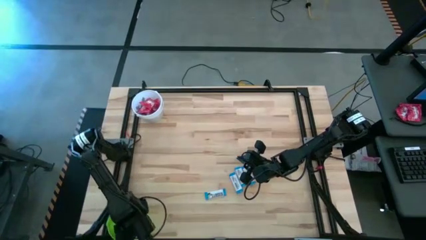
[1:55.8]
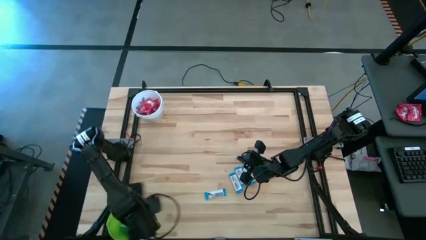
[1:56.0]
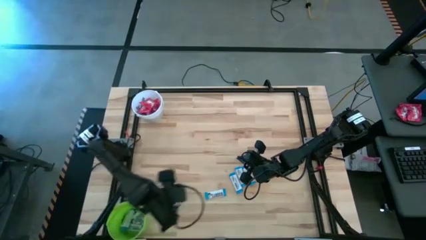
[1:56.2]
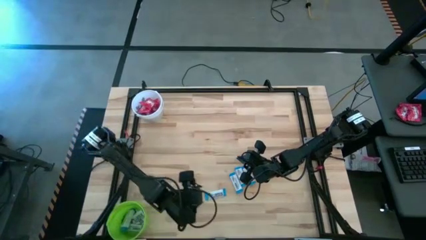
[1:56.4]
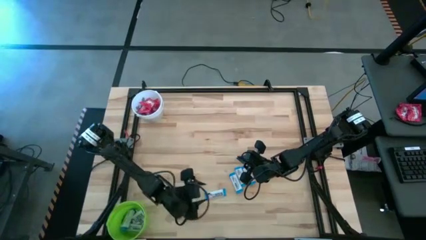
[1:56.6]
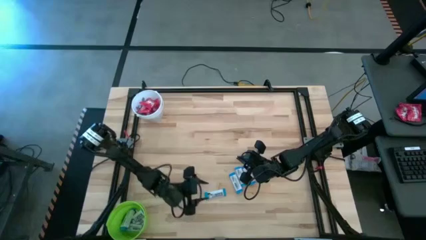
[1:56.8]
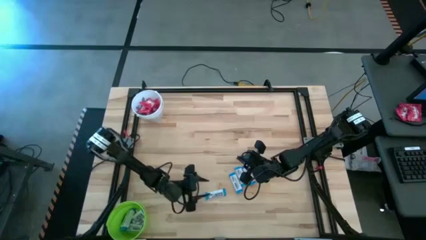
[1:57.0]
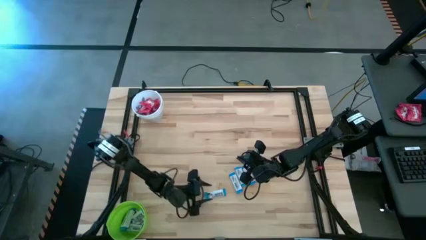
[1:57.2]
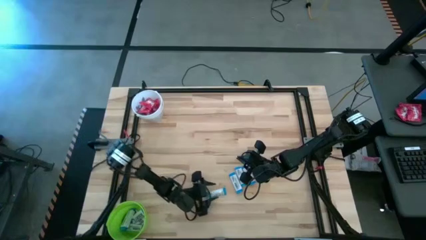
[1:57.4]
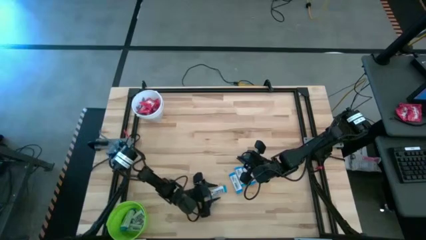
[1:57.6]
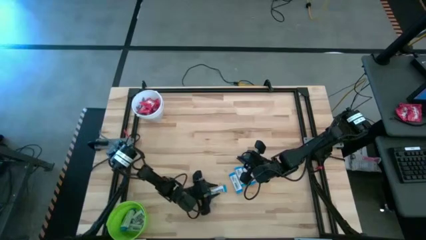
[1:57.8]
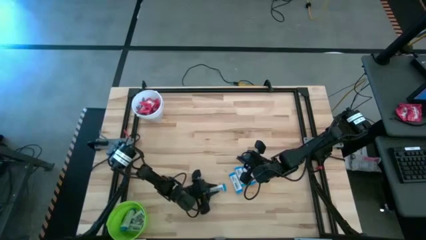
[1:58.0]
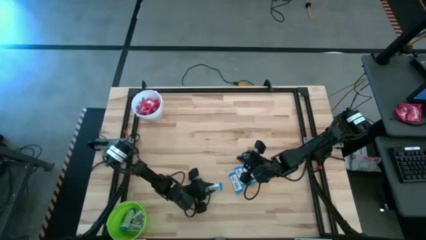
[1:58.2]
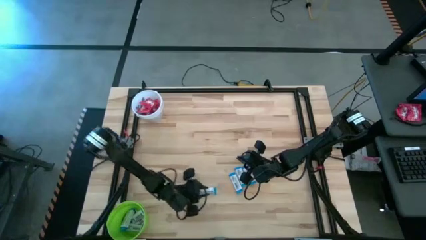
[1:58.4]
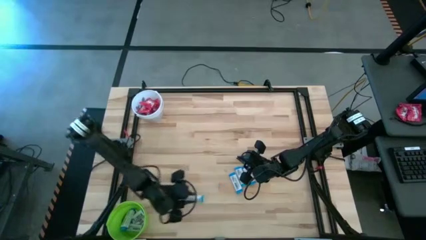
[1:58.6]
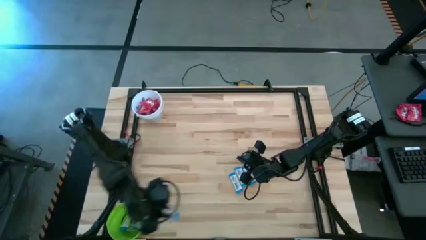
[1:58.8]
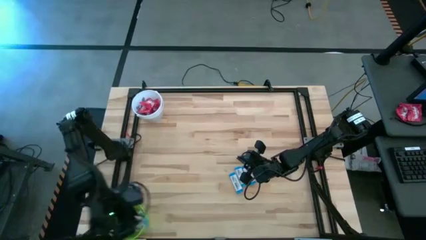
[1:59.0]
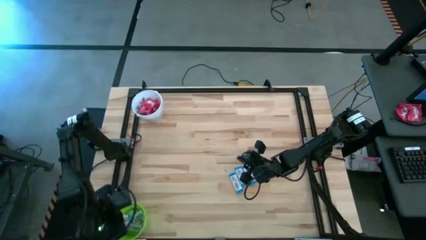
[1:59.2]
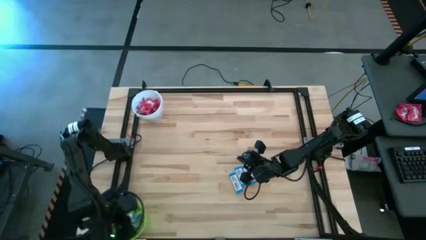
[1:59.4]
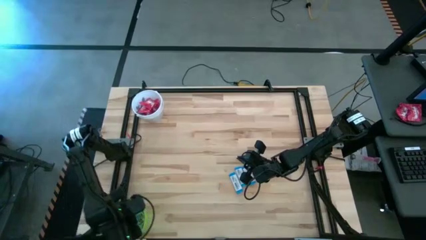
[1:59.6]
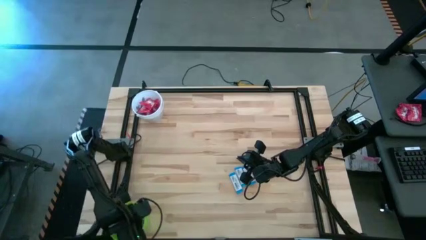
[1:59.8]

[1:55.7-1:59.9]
Task: Sort candy by brand, put in halloween buckets
Put the blue chocolate bar into the green bucket

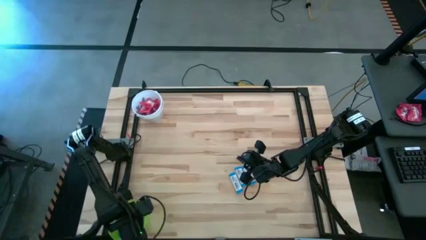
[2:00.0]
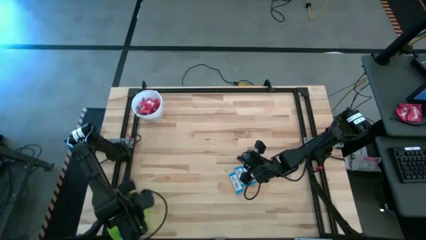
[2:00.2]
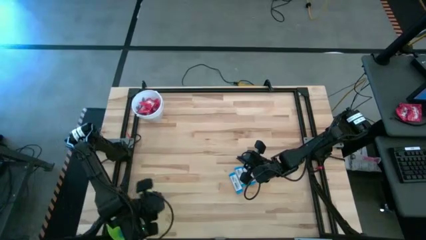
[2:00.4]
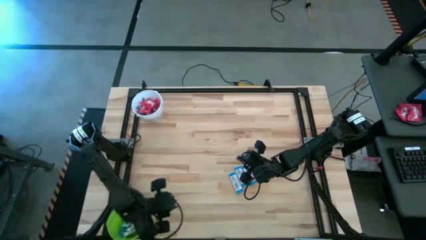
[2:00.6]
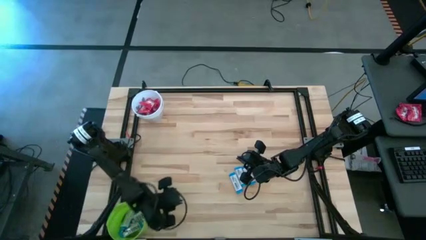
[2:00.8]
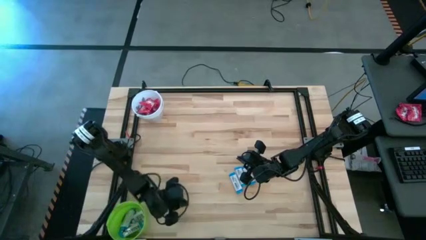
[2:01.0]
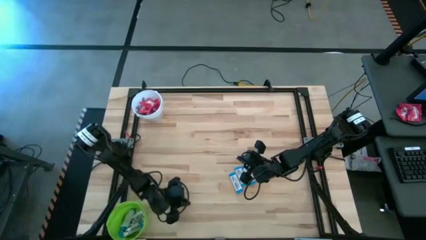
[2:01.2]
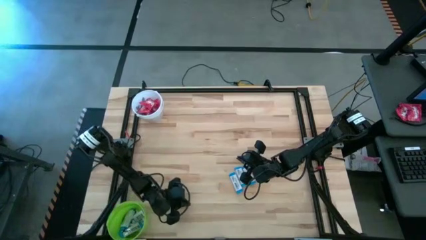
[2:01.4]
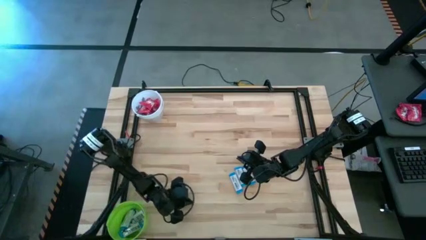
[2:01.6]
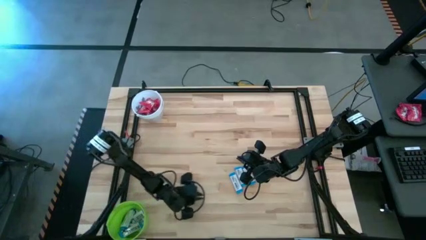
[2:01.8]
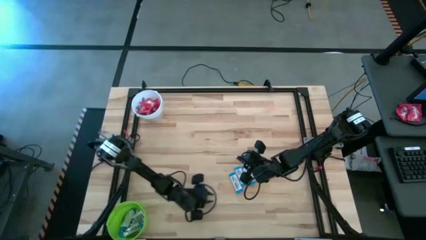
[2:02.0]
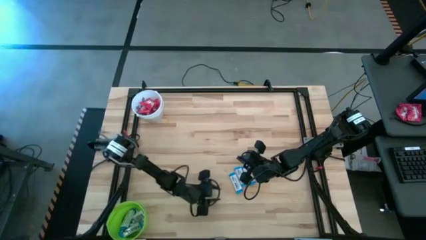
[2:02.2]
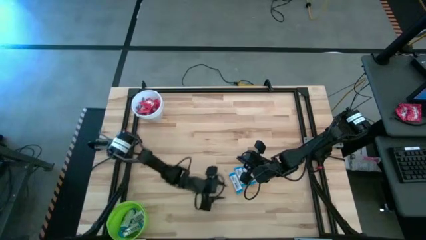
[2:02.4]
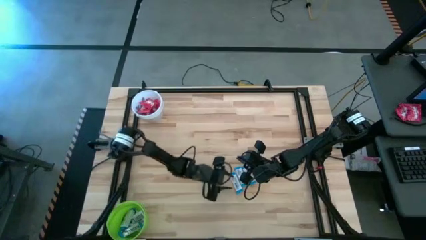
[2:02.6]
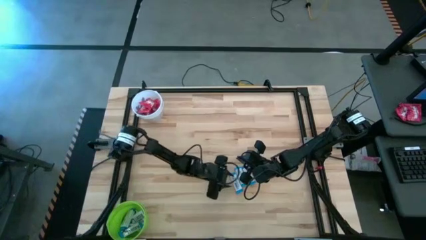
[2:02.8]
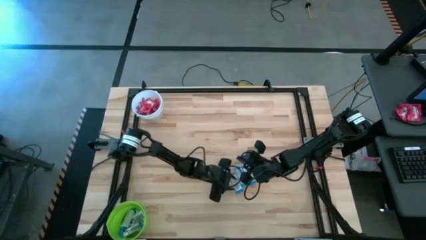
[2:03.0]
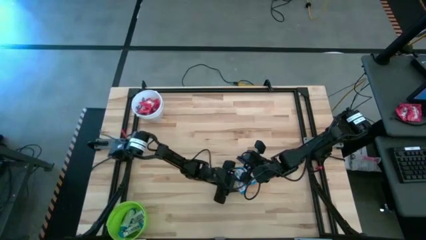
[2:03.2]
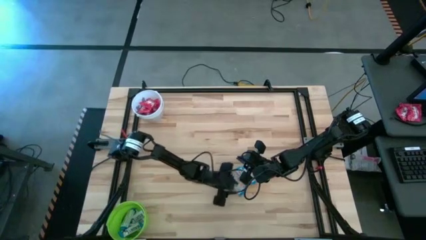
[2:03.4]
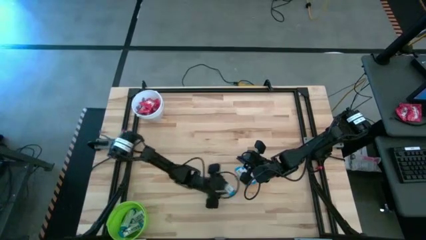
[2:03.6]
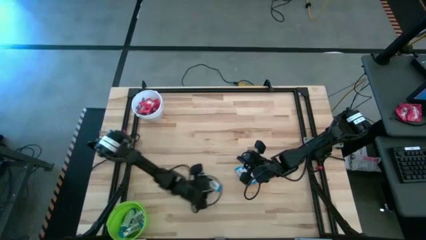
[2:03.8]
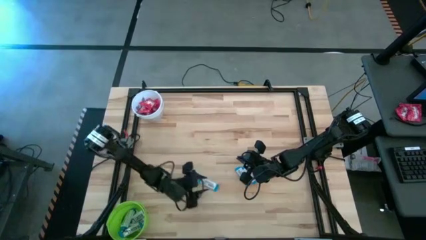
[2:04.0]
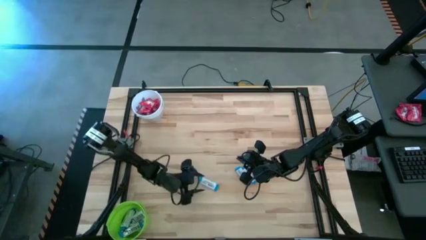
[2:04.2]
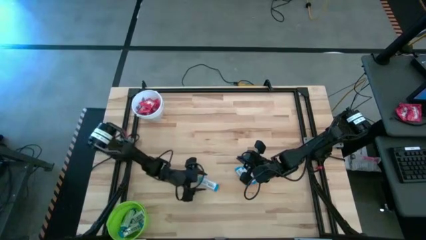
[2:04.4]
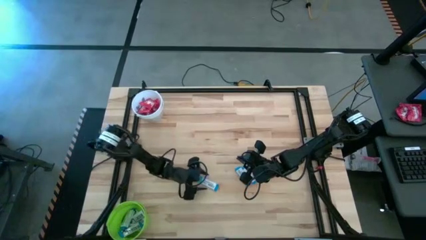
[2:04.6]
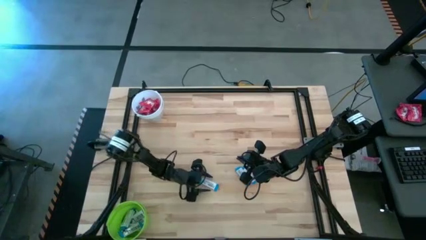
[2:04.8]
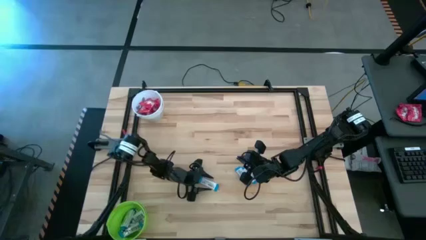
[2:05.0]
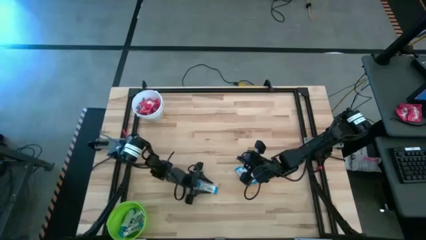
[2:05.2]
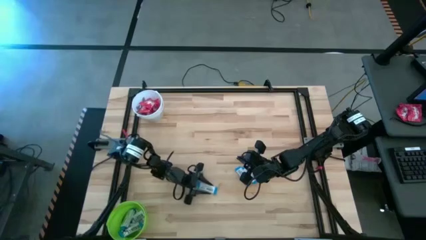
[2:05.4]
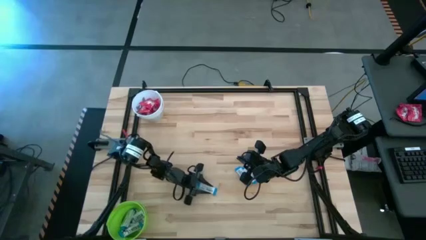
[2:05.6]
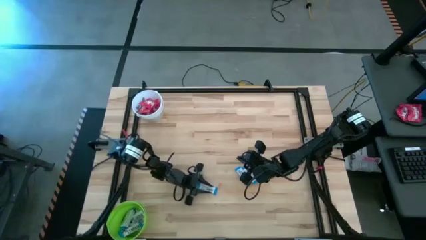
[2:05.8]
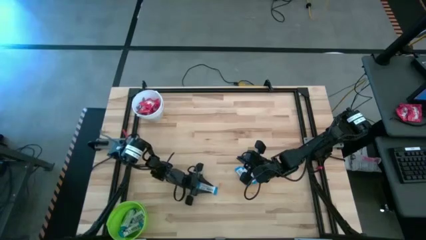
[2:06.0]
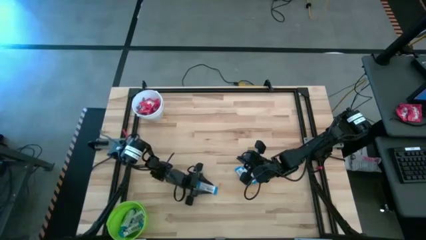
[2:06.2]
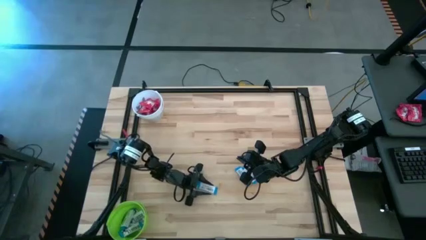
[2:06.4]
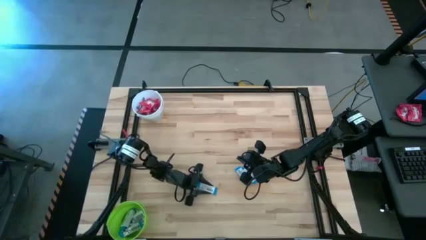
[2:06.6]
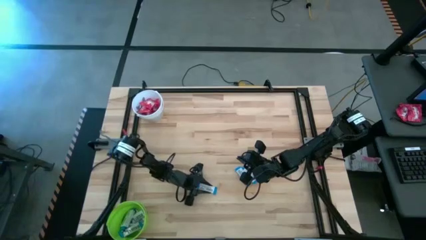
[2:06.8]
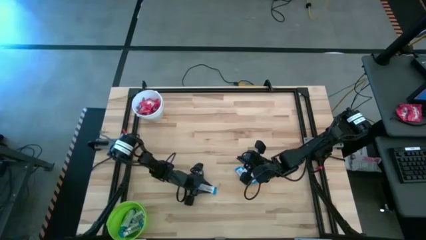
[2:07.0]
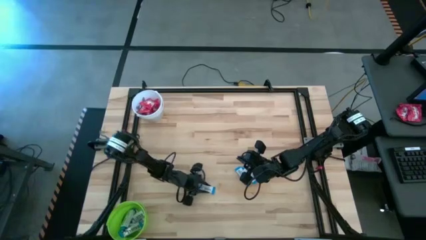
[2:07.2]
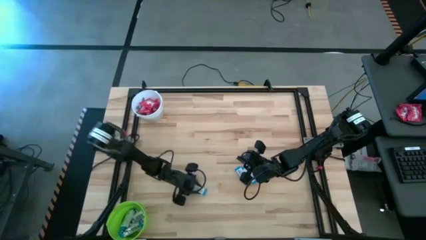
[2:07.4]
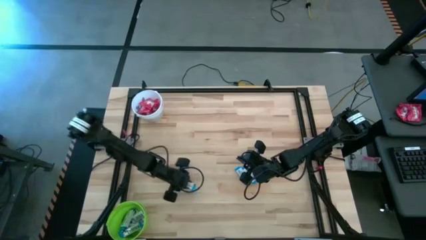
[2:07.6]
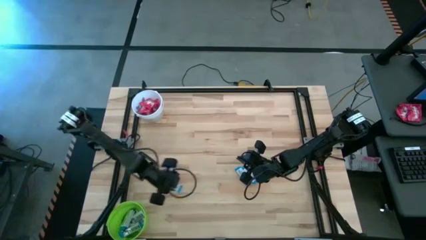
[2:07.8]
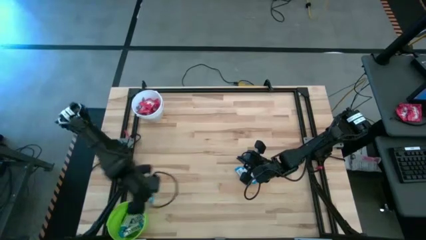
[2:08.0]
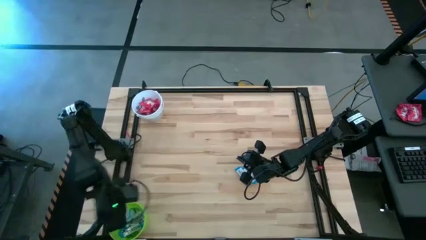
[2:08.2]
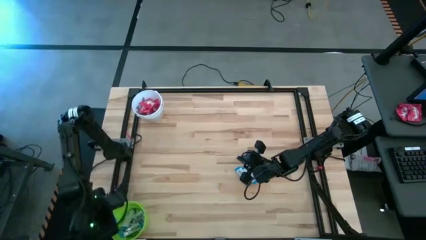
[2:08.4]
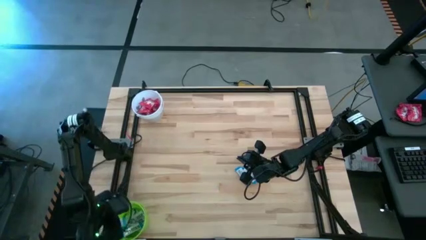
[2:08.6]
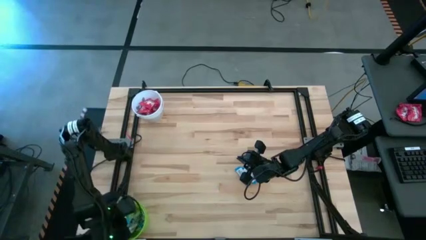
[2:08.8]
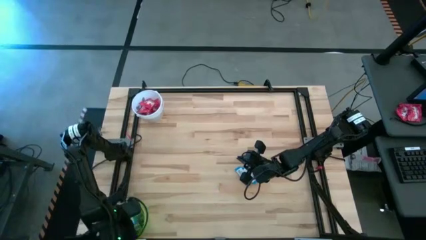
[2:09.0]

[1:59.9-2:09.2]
Put the left blue chocolate bar into the green bucket

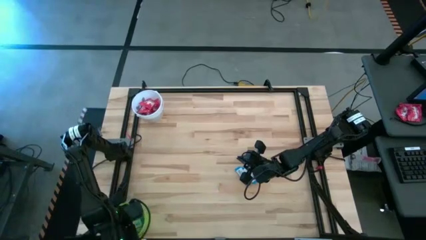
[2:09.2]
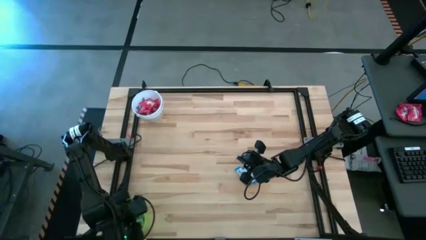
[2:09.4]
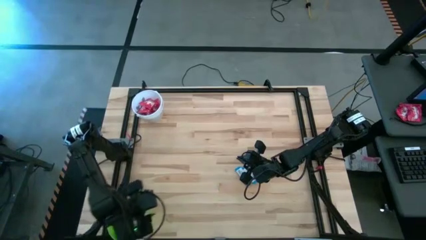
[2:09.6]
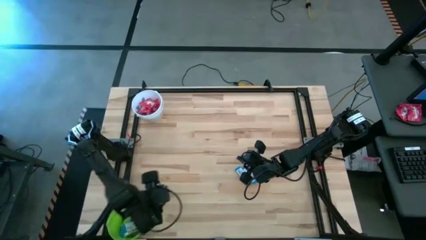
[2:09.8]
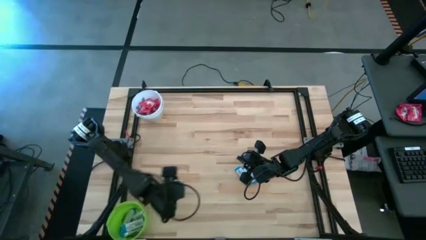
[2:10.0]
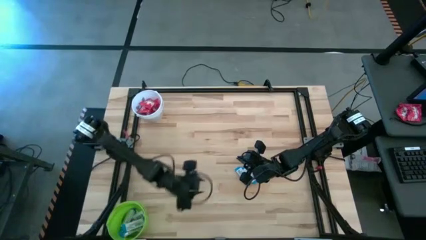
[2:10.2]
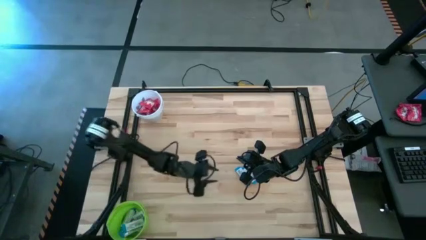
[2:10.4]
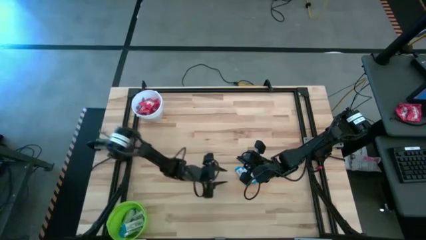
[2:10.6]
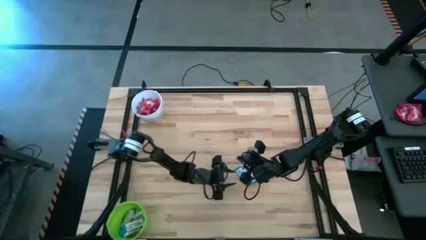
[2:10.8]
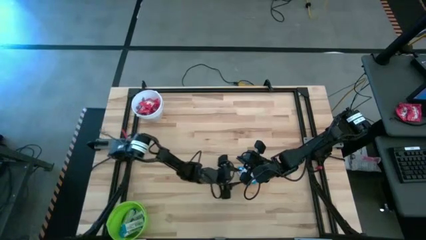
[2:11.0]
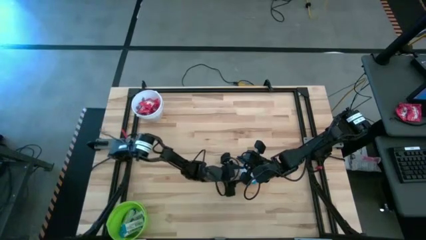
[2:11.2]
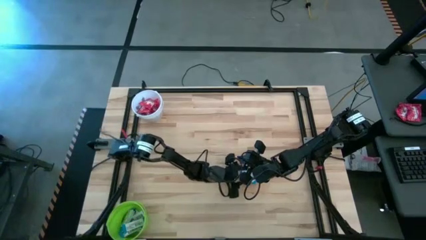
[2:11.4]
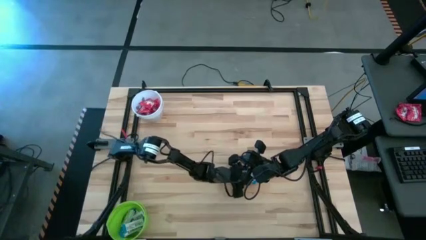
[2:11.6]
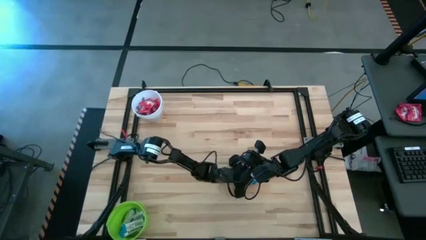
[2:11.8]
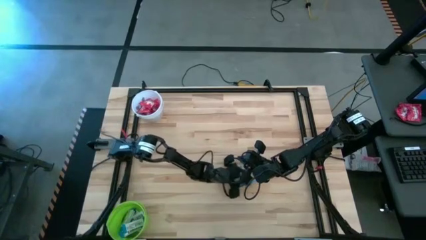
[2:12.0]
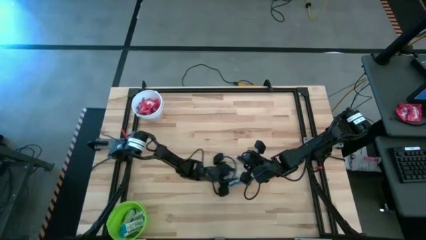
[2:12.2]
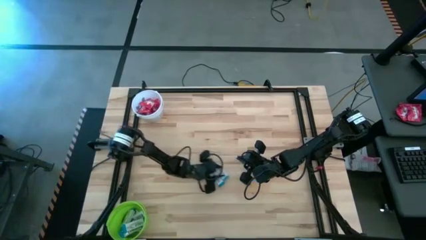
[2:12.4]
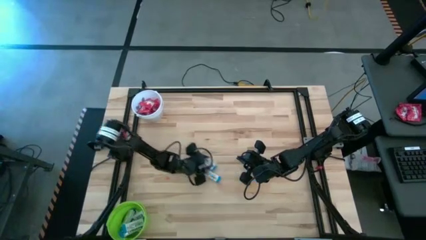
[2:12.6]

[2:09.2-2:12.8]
Adjust the blue chocolate bar
